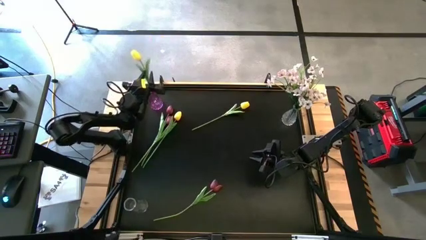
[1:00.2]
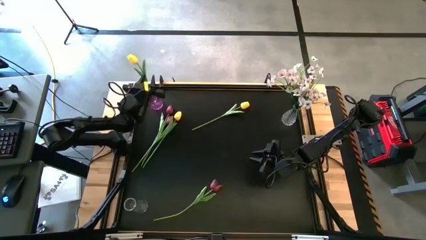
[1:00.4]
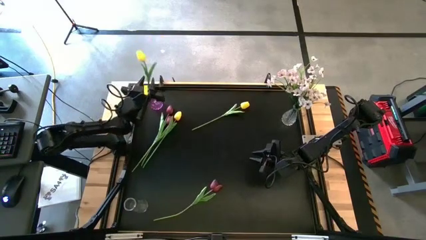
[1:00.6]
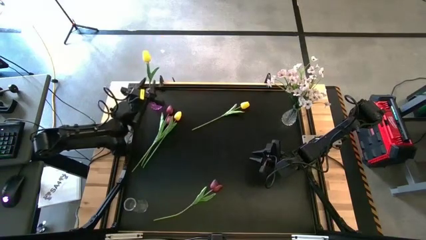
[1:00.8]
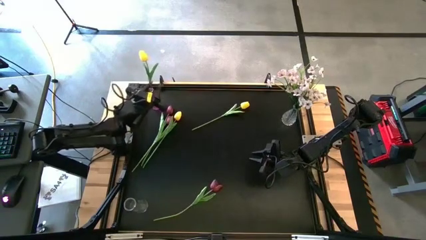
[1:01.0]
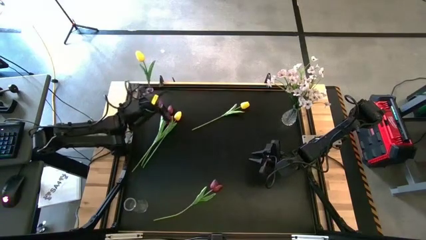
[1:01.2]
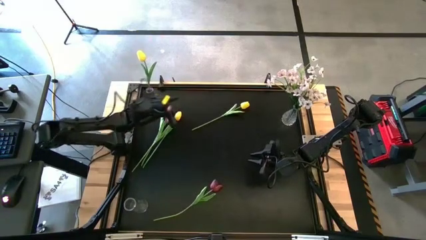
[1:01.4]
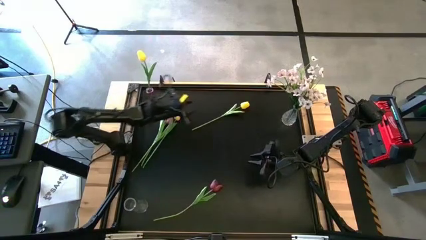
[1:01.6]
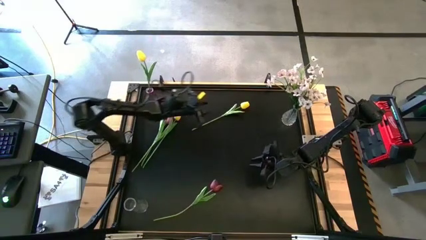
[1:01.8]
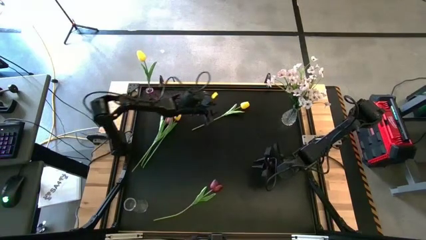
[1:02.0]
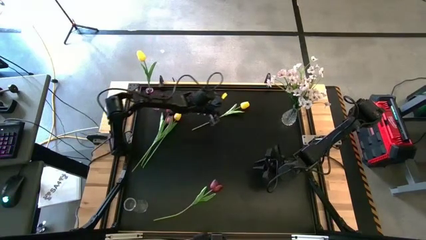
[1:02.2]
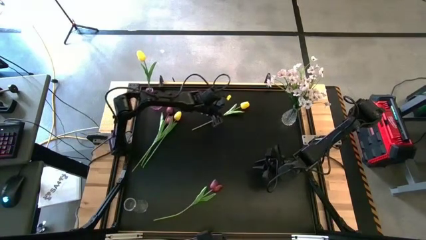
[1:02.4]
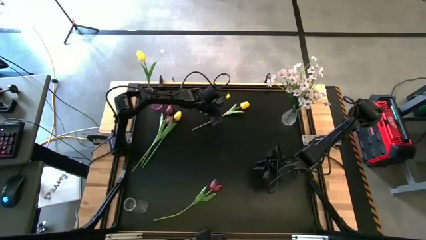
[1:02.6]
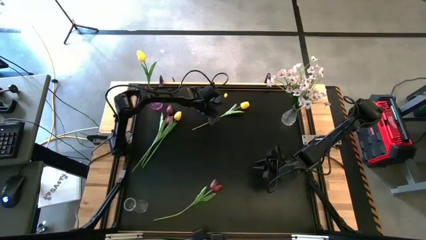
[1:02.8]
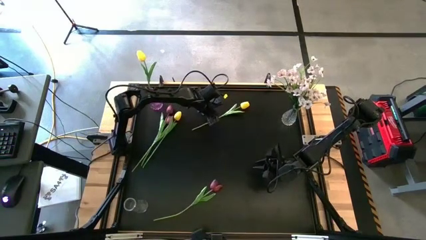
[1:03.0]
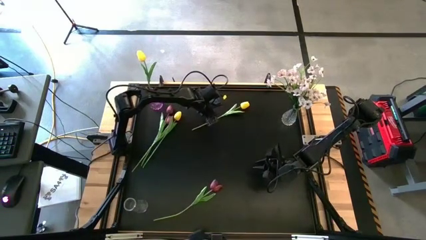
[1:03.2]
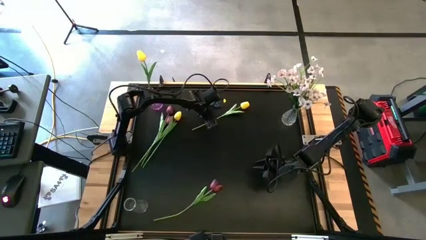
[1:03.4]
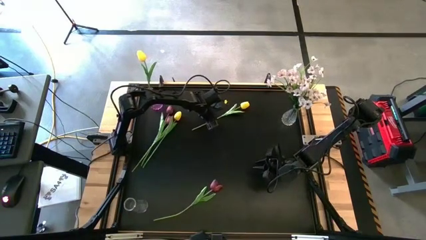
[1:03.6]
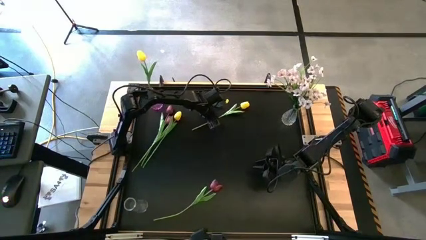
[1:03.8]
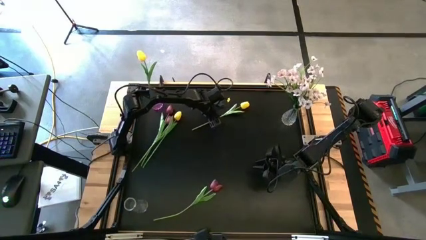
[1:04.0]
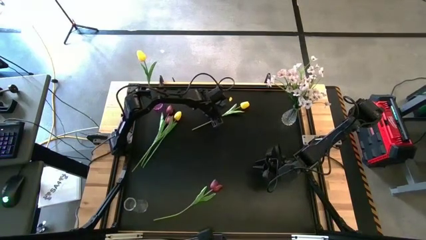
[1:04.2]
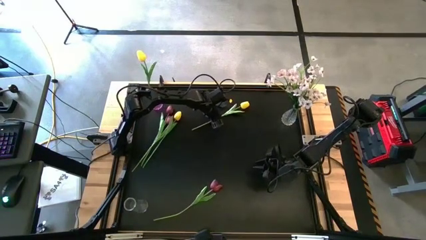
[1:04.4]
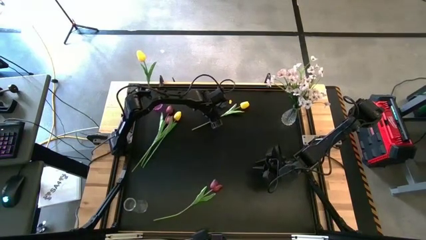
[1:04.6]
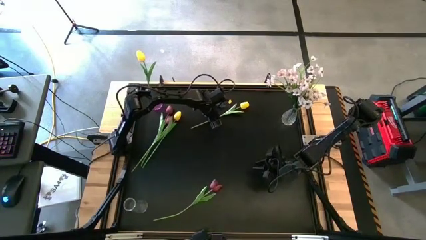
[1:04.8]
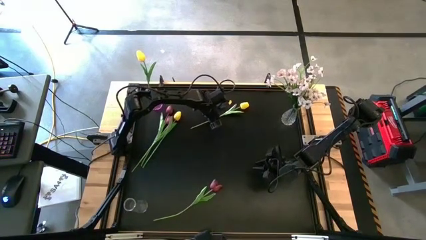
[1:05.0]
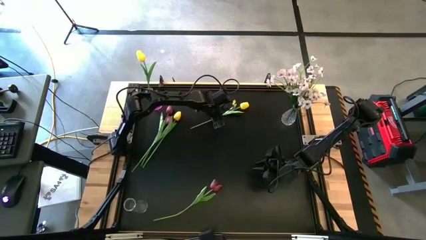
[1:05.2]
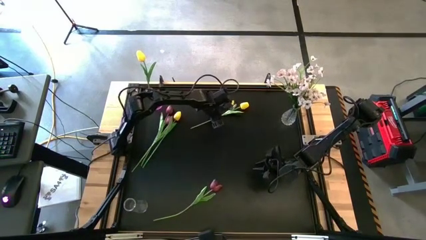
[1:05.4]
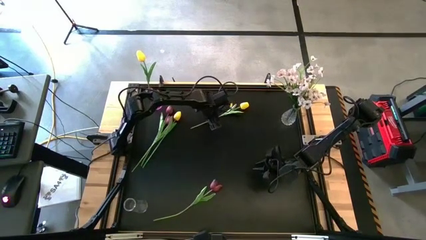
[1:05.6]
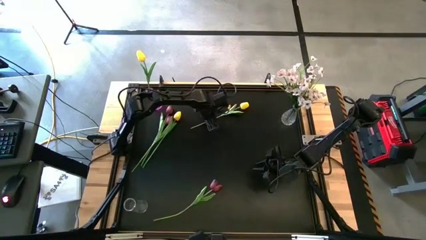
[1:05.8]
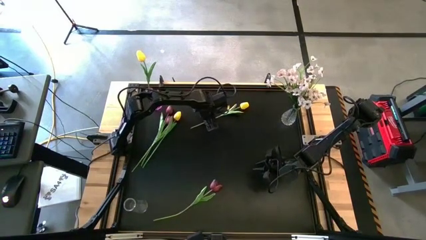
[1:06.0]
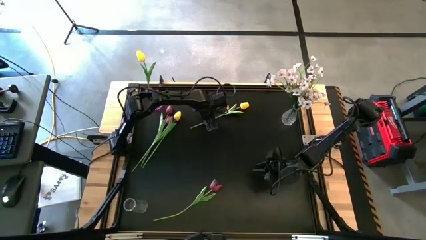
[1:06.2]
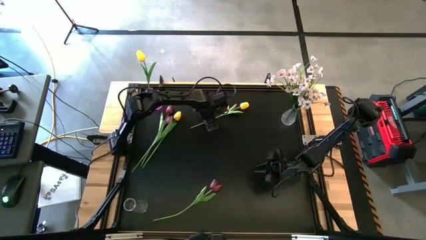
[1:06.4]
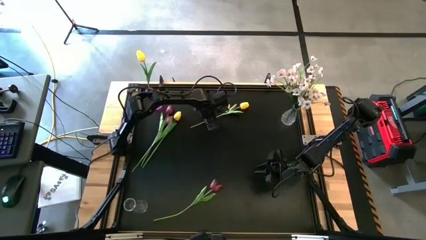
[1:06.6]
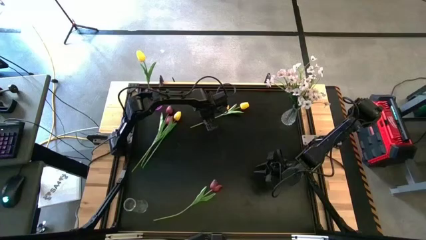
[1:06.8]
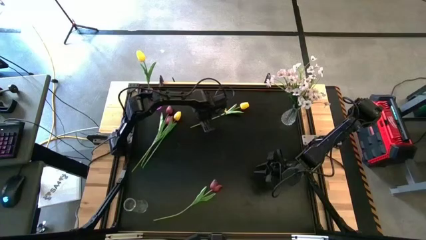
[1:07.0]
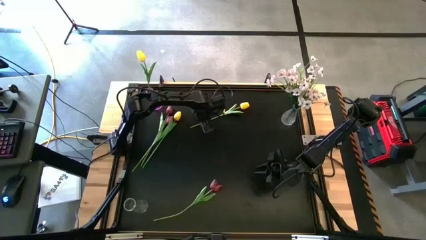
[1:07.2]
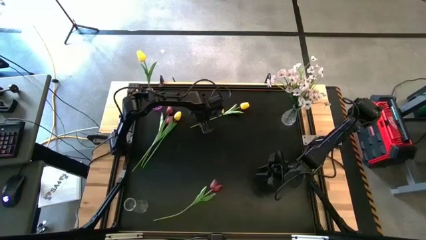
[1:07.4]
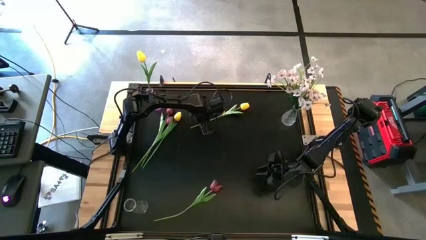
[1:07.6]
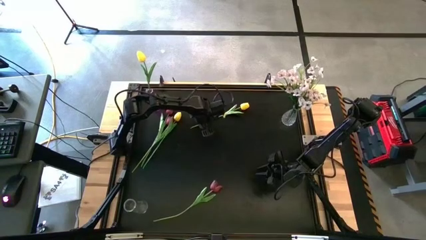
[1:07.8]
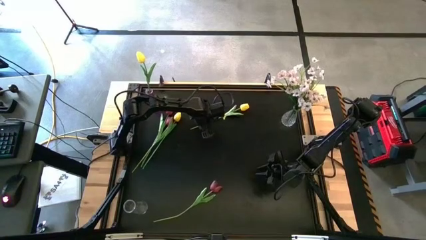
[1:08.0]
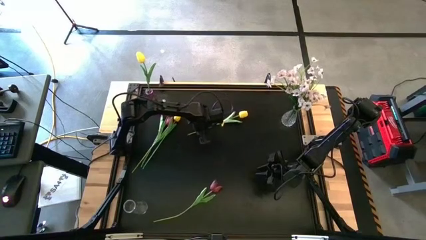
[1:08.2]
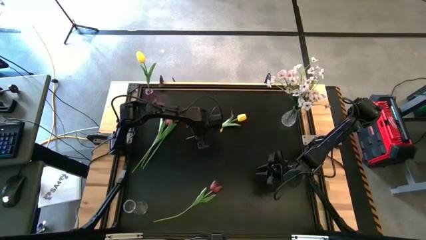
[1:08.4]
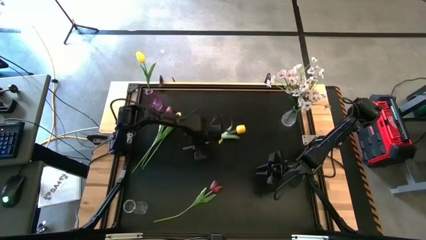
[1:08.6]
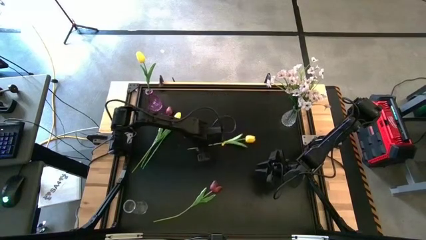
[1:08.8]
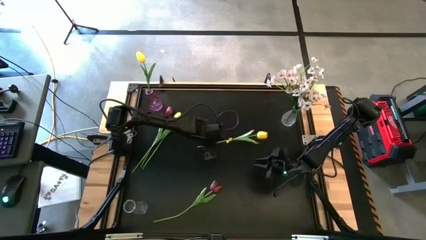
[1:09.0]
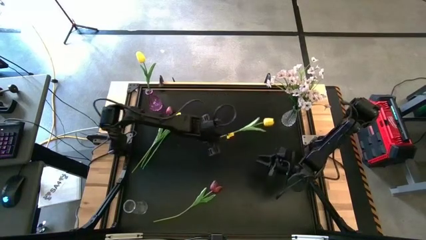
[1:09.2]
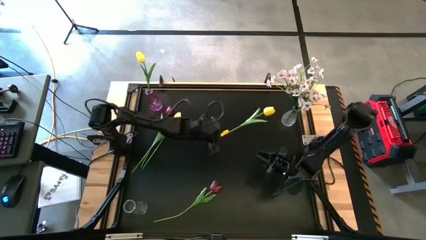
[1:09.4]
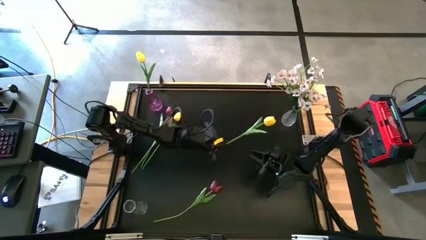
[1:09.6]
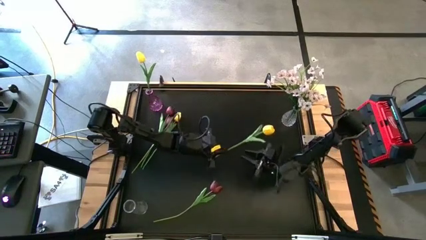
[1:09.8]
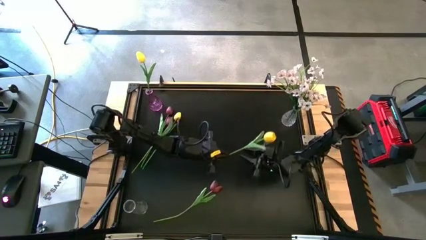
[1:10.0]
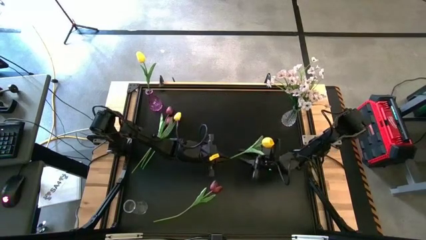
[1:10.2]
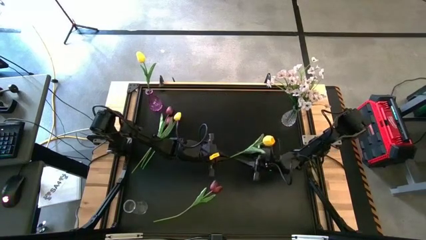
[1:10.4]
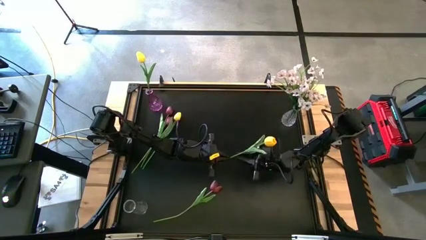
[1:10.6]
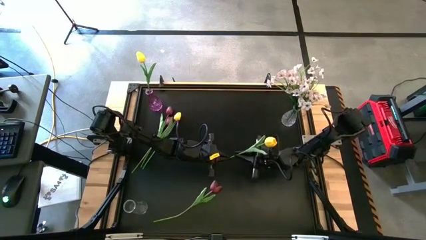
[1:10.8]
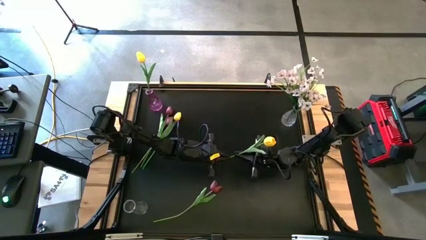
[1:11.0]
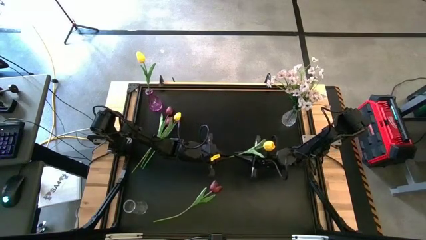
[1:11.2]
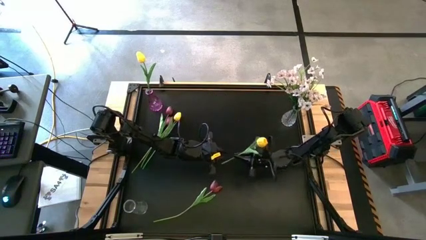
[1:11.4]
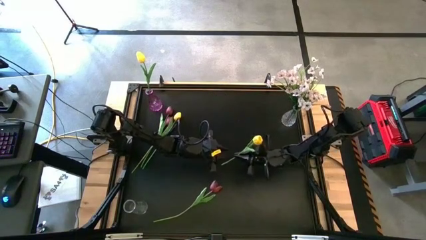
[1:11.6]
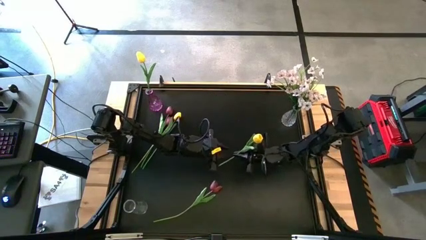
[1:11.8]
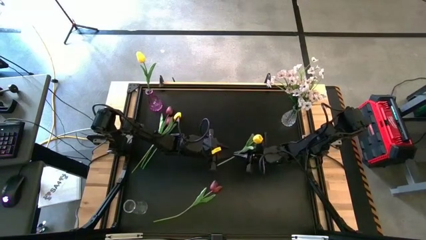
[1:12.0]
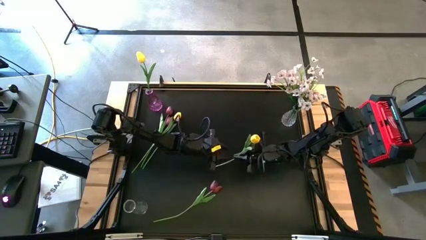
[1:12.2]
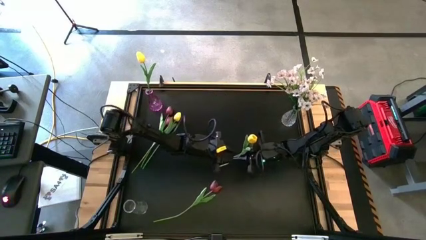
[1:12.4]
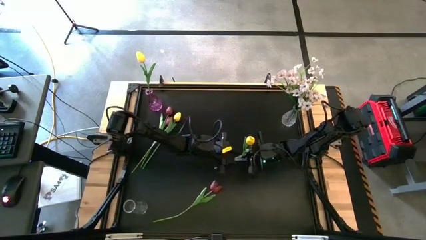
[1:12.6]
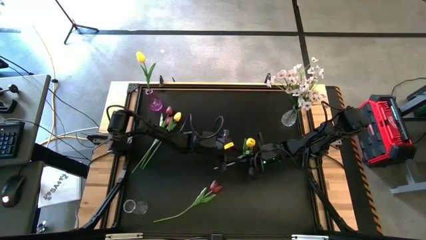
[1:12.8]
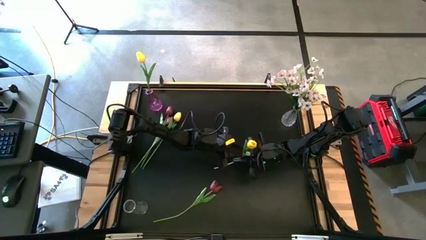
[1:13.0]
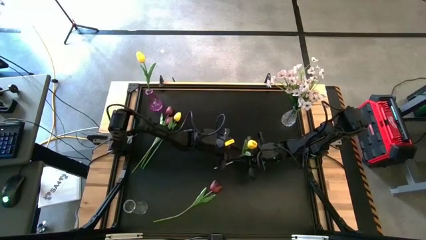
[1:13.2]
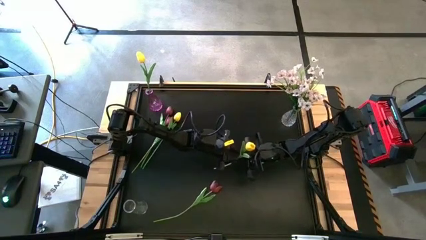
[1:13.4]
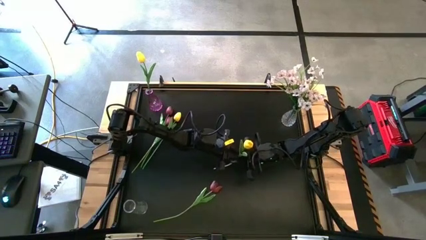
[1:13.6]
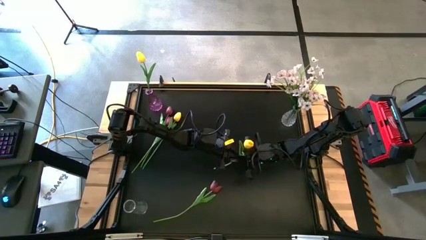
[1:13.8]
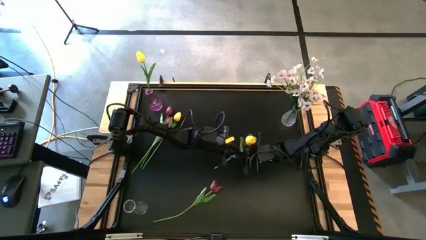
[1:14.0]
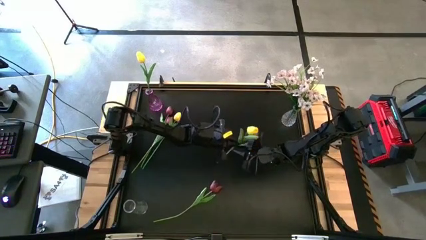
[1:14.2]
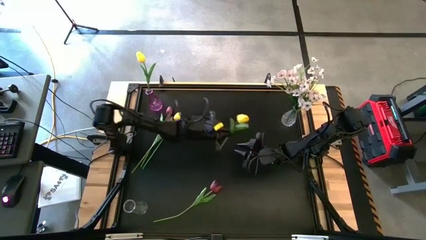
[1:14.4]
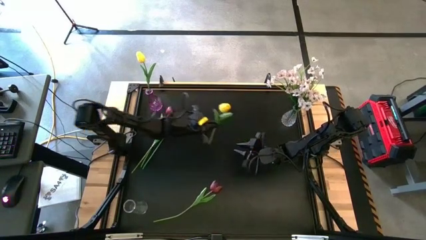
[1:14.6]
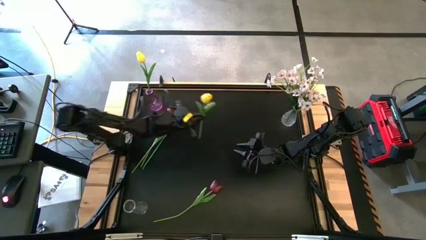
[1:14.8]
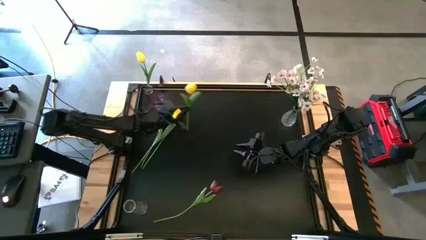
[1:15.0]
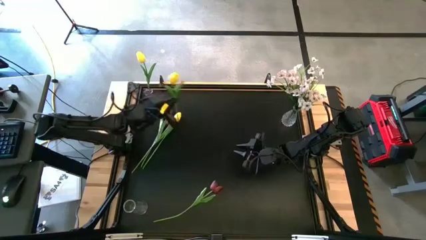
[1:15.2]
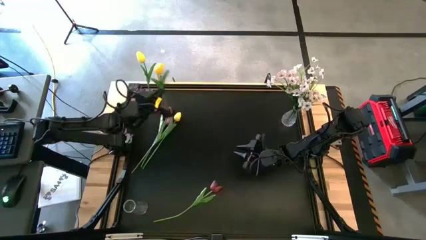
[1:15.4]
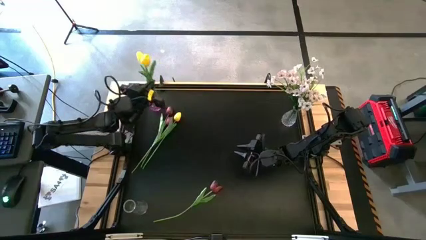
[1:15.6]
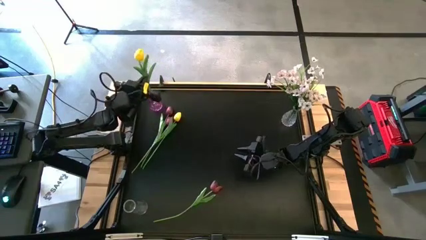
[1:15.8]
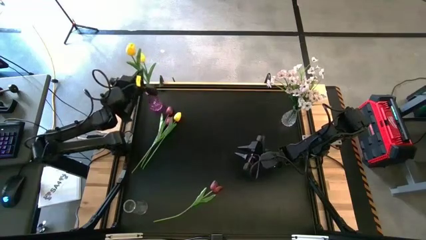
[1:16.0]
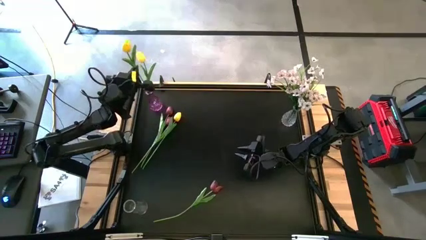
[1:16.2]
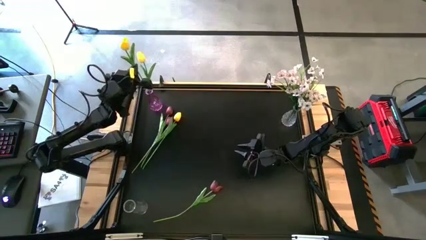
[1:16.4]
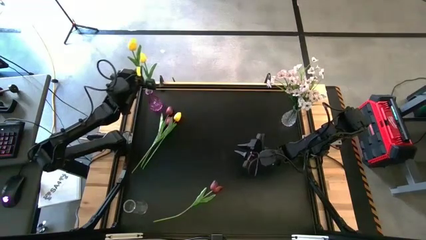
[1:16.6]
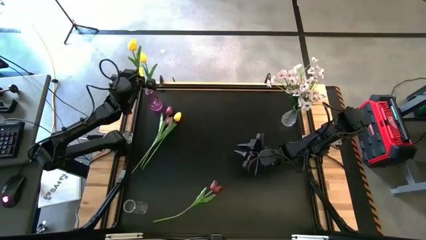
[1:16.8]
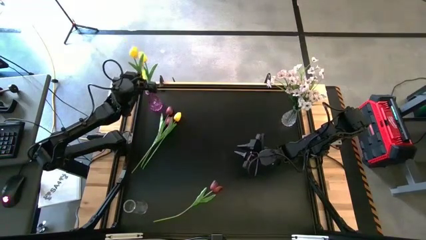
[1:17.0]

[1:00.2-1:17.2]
Task: Sort flowers into vase by color
Put the right yellow flower into the purple vase
